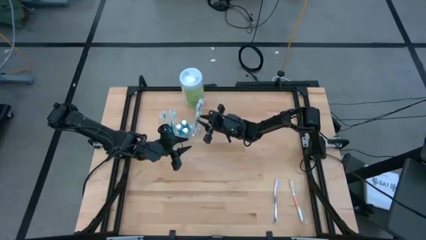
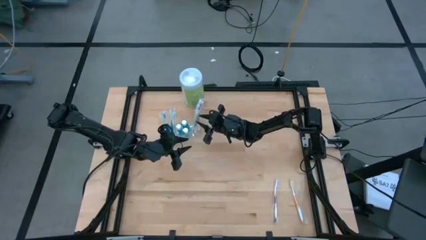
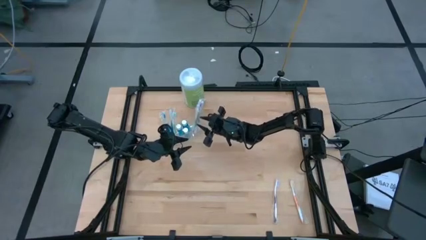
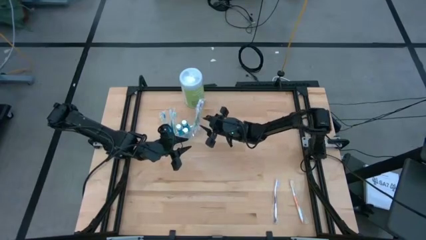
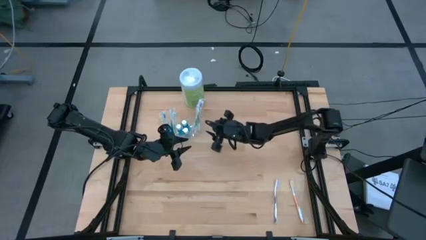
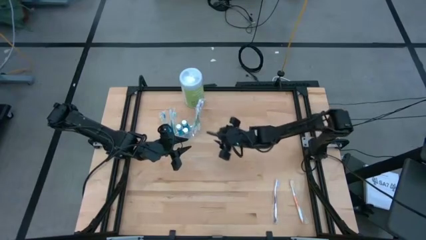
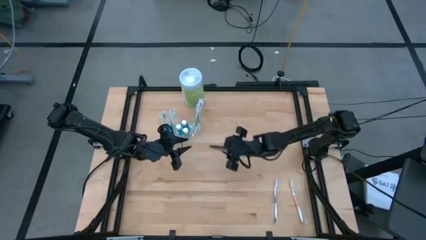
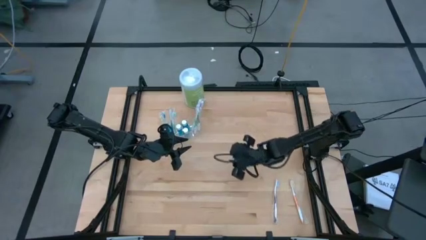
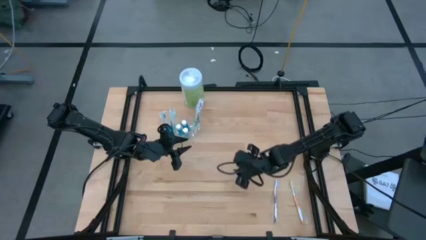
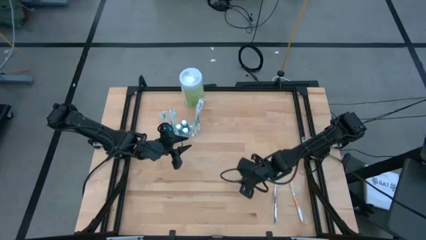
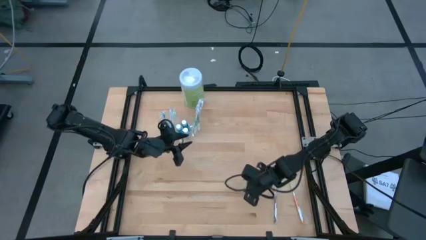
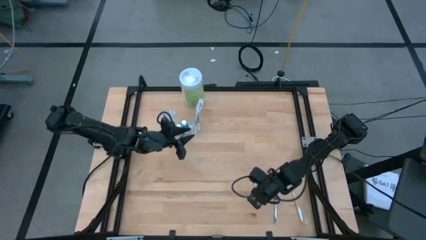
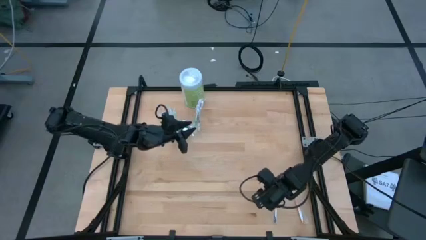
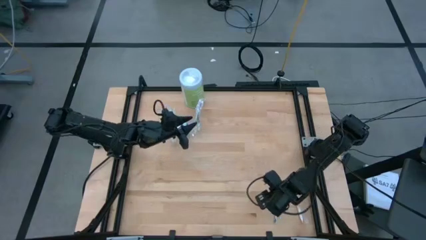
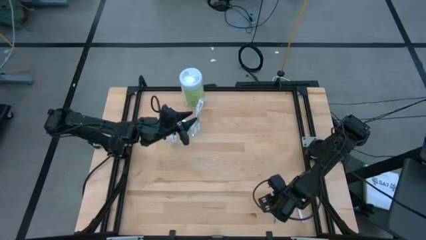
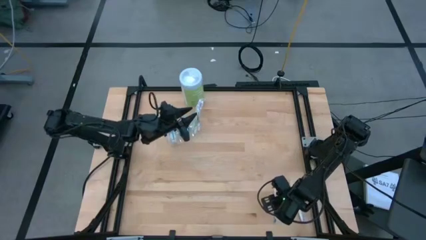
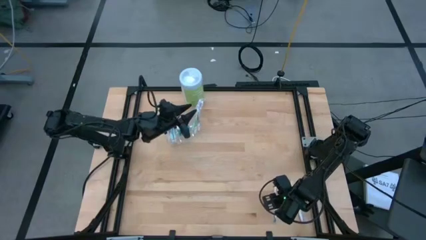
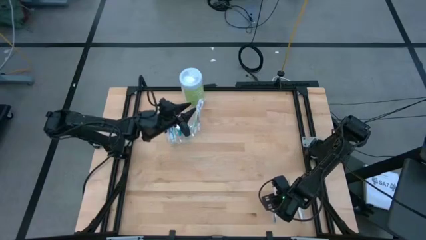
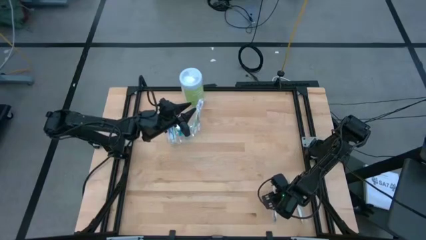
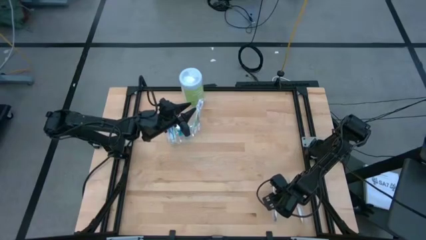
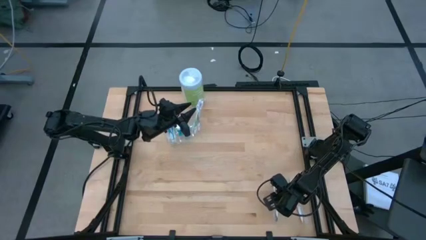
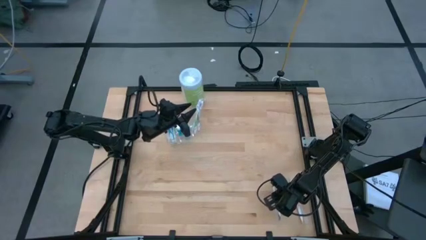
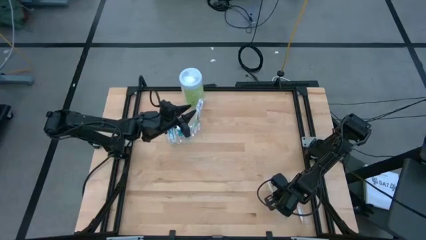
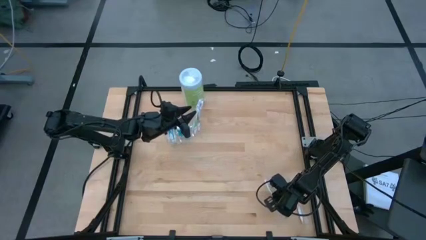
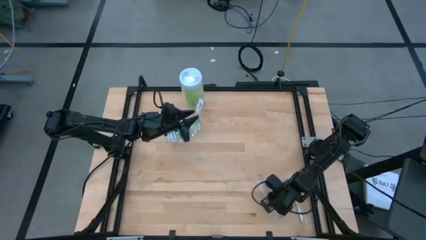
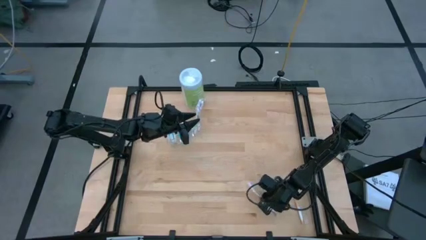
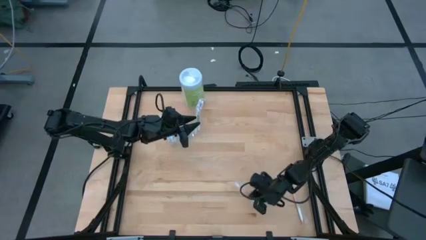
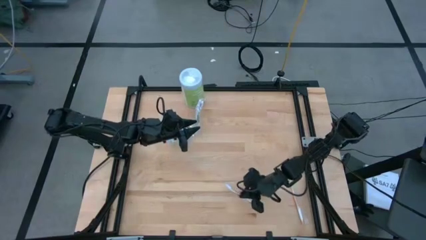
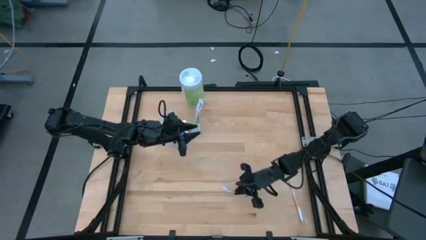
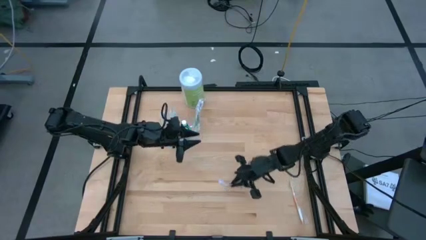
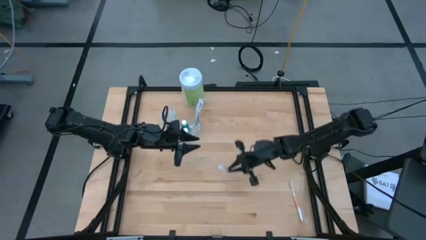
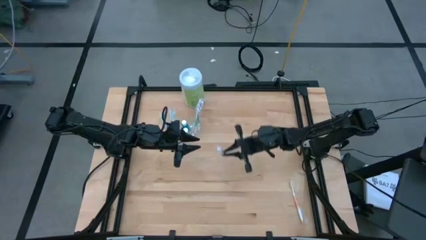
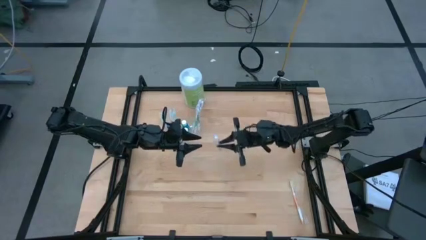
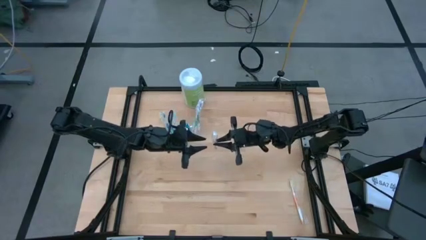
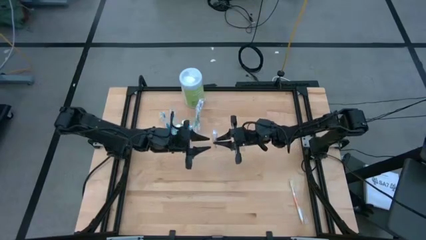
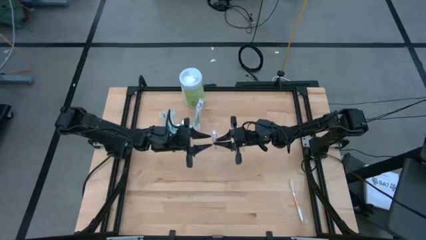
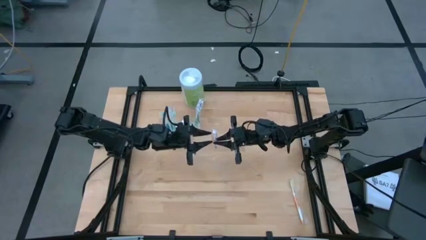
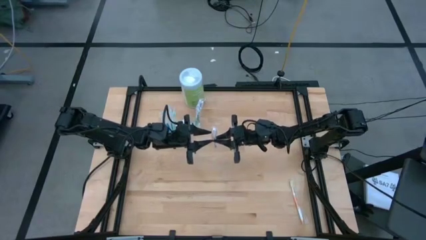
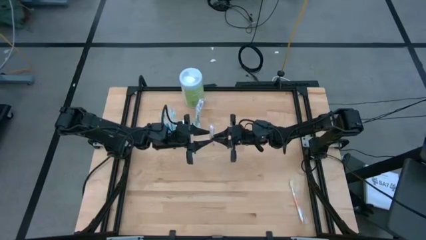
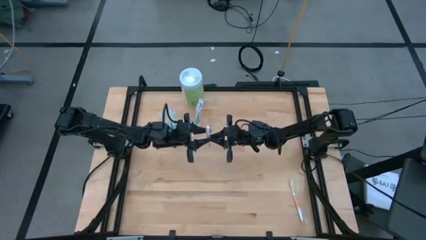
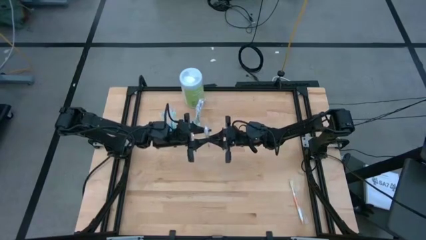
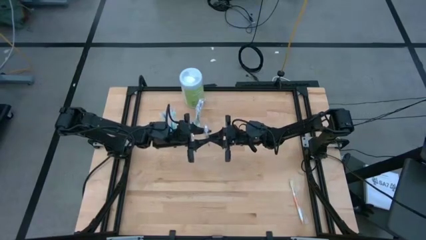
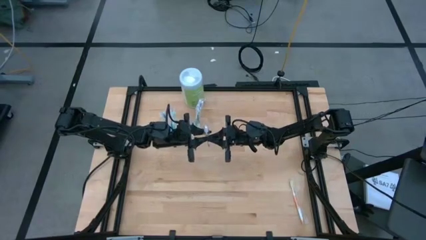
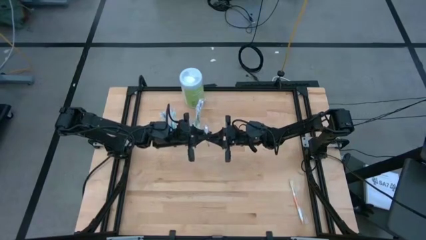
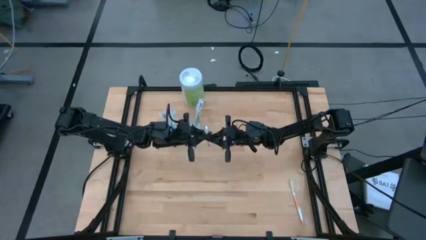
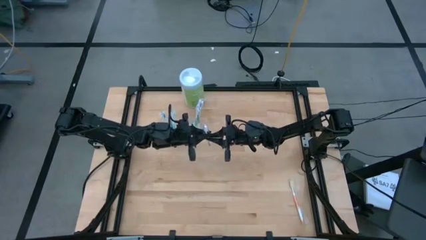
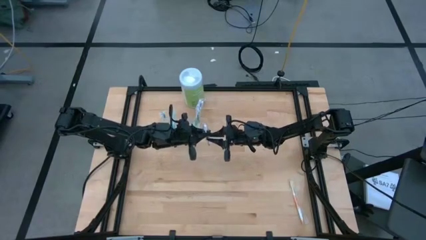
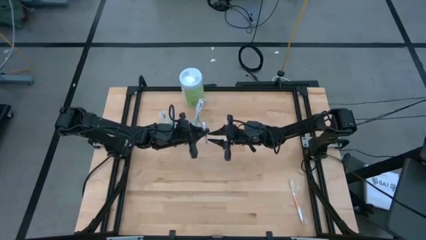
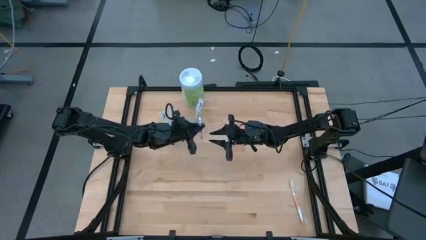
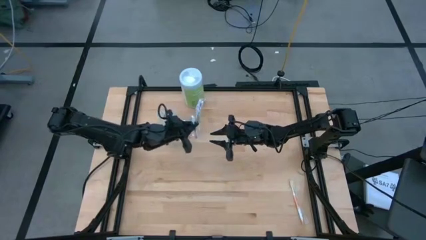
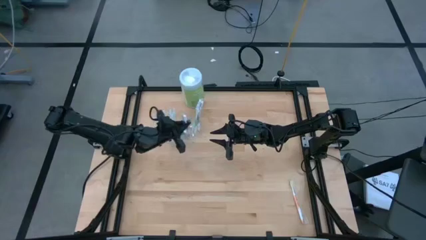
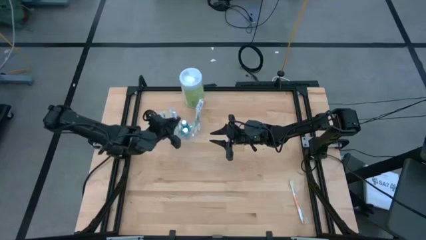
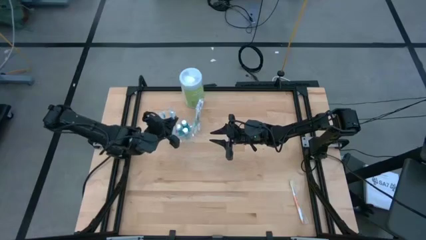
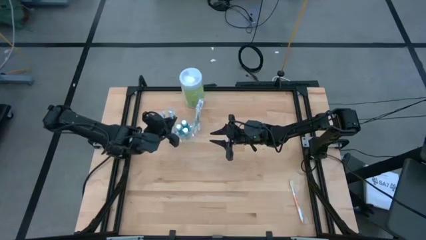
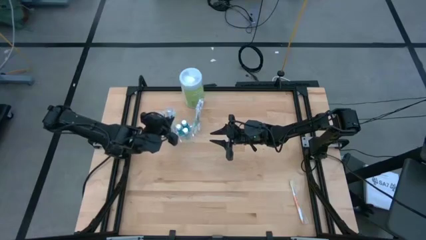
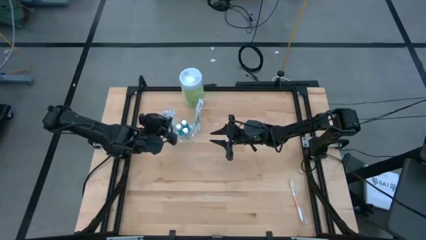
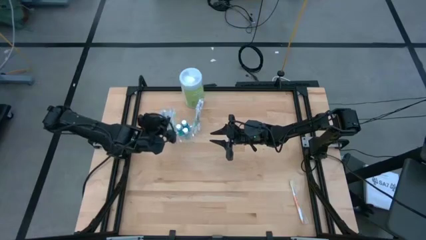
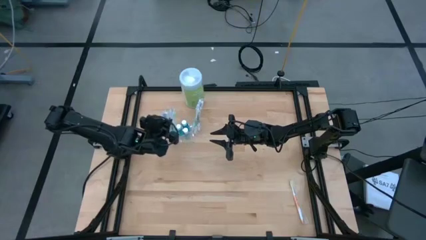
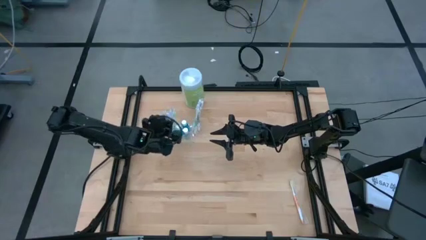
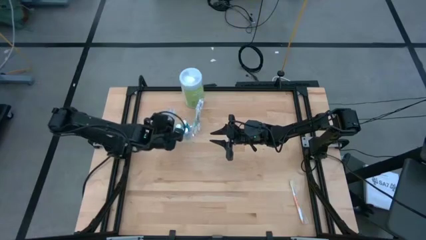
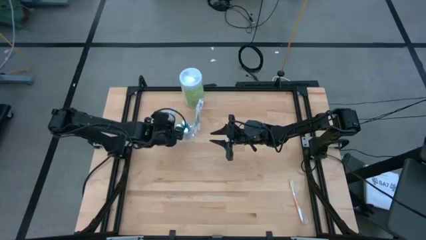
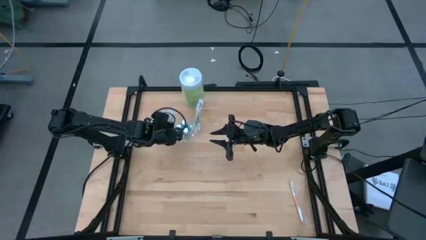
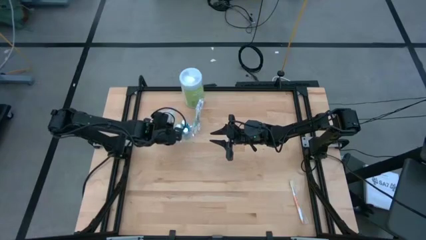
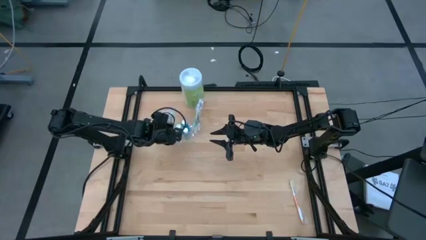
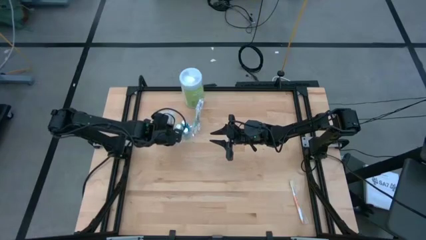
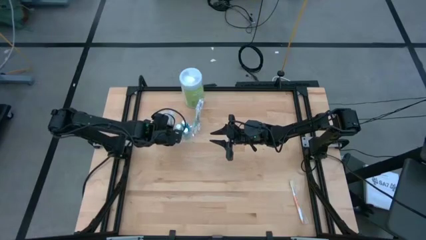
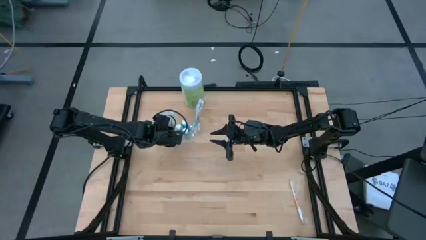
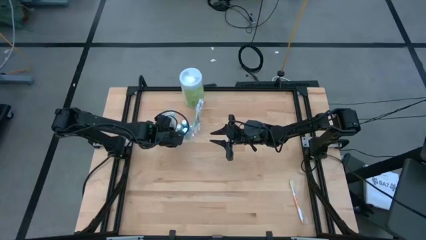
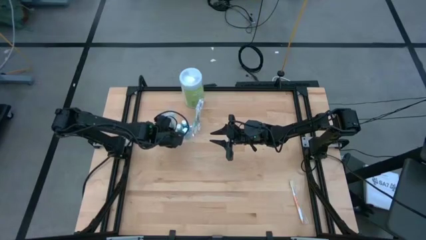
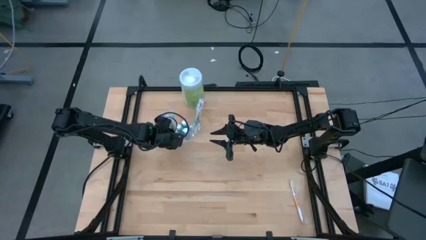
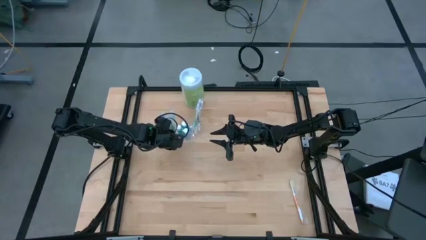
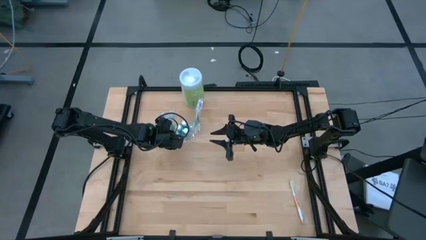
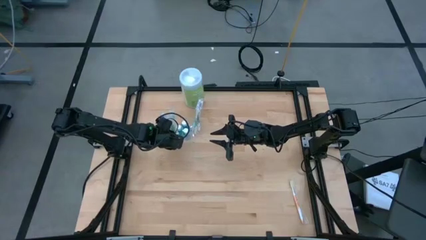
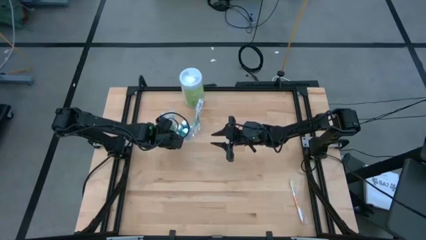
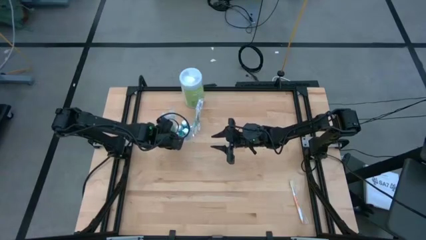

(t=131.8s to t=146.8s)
Task: Pick & Place toothbrushing station
Put the purple toothbrush into the transparent organizer

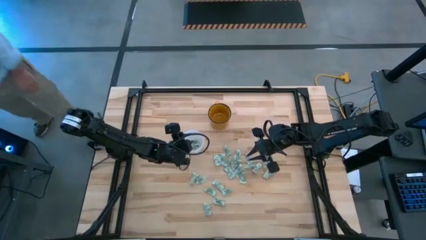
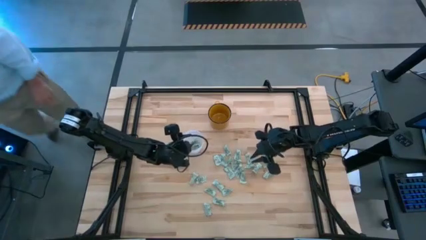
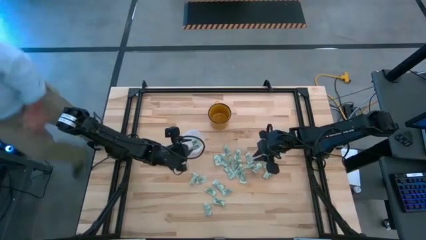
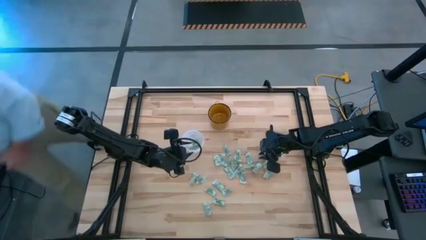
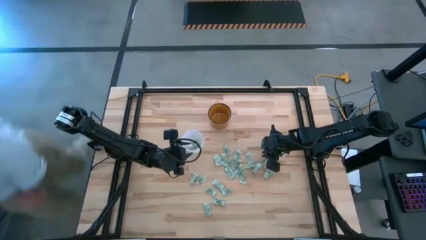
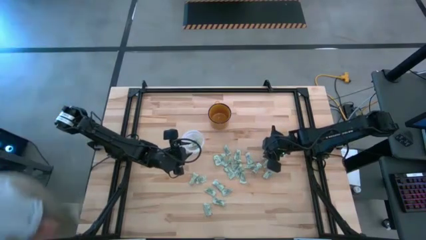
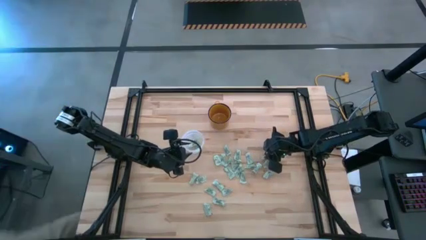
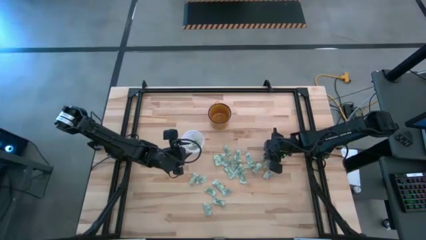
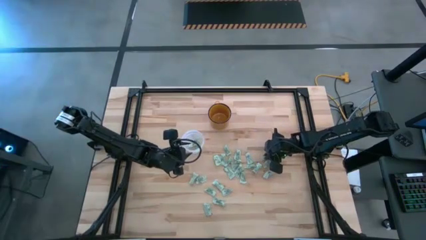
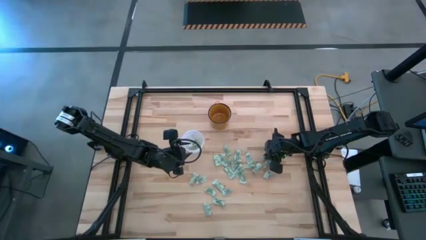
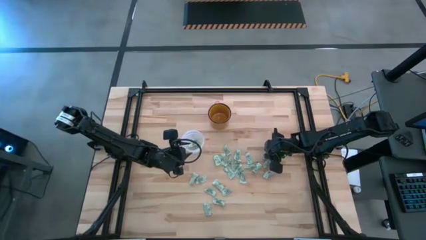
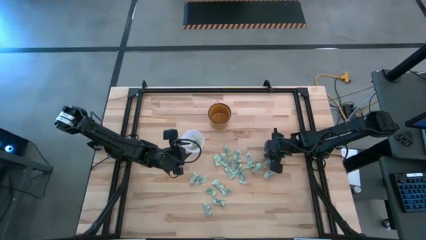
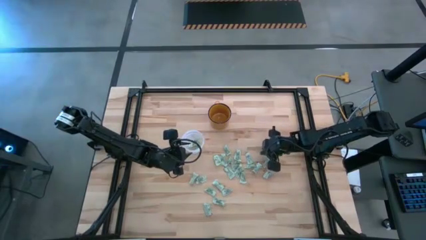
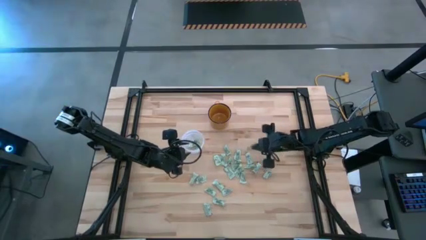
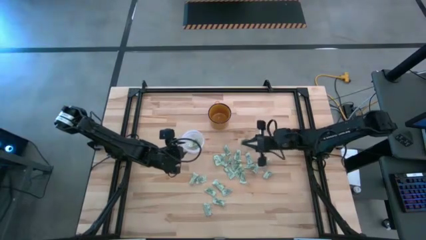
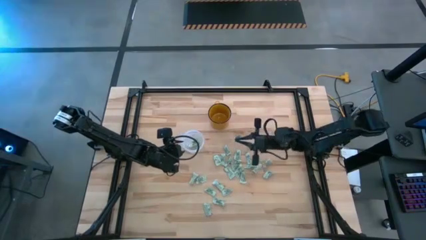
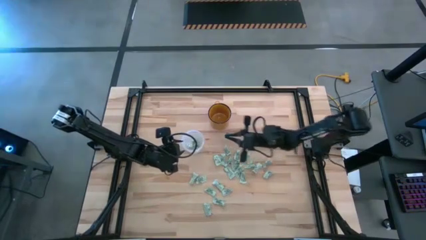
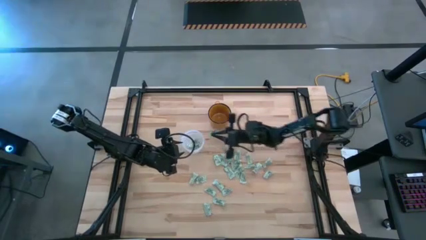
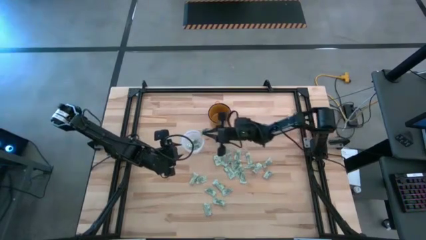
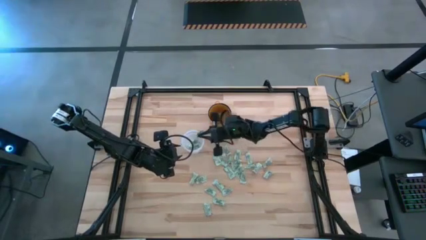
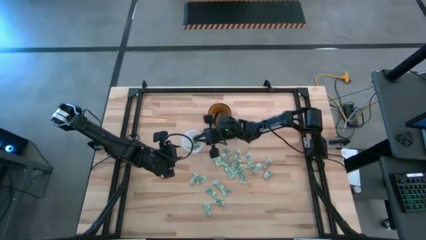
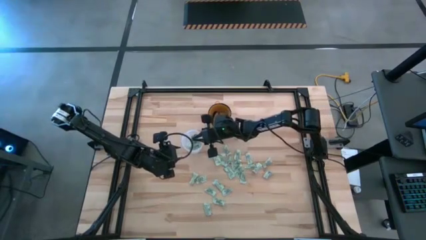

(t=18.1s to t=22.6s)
Task: Pick and place Stevia / Truvia into bins
Put the stevia packet into the transparent bin
